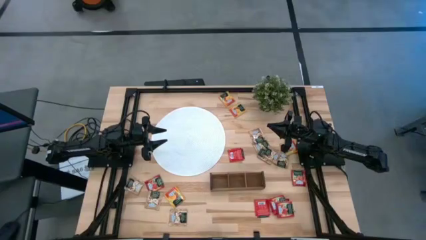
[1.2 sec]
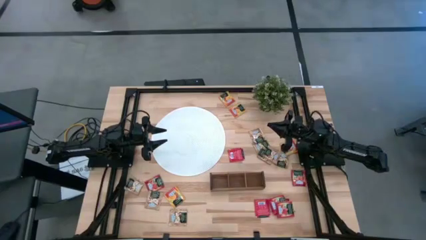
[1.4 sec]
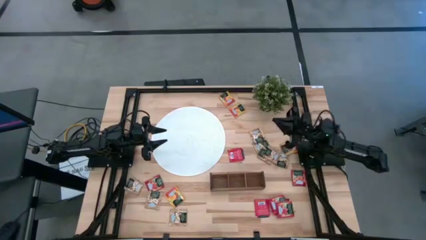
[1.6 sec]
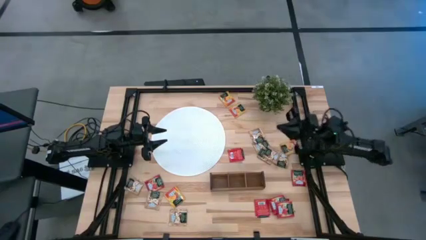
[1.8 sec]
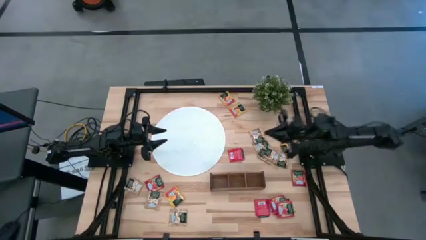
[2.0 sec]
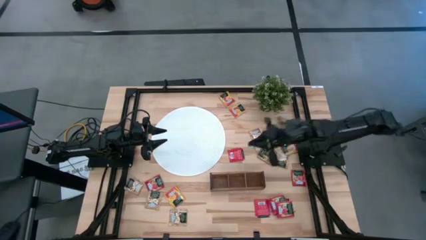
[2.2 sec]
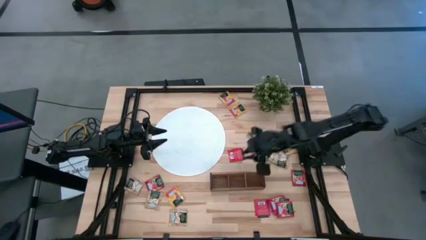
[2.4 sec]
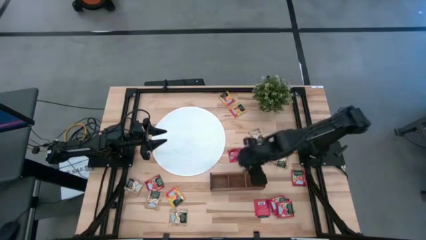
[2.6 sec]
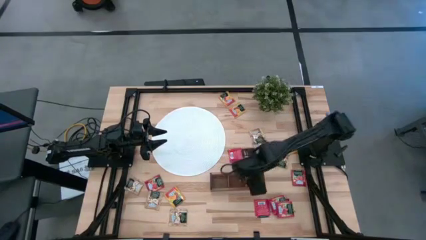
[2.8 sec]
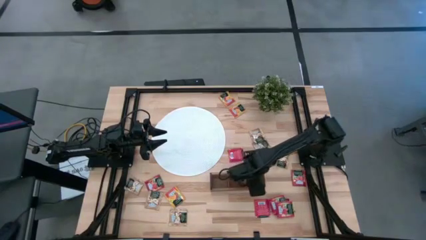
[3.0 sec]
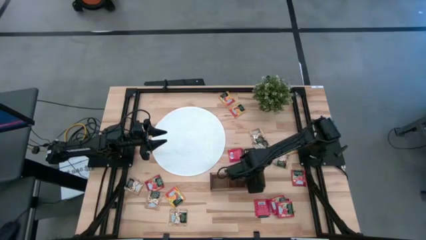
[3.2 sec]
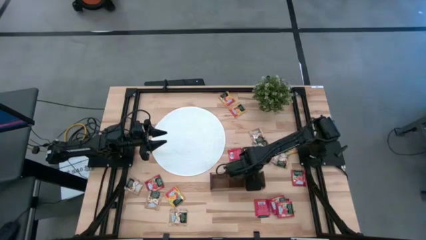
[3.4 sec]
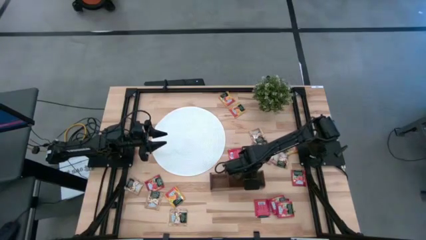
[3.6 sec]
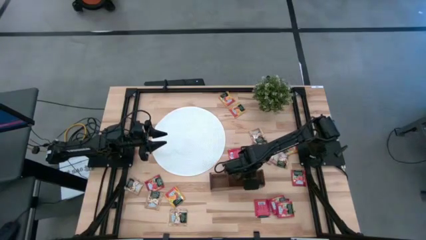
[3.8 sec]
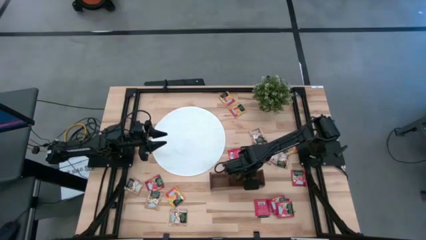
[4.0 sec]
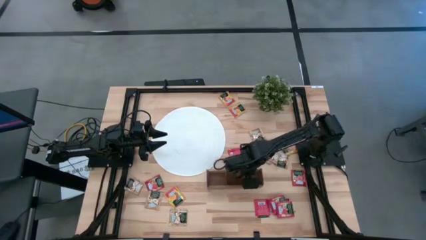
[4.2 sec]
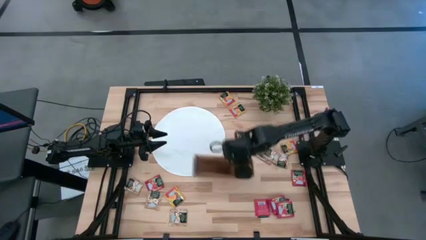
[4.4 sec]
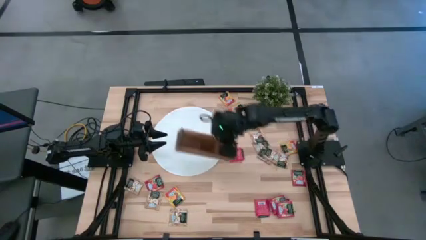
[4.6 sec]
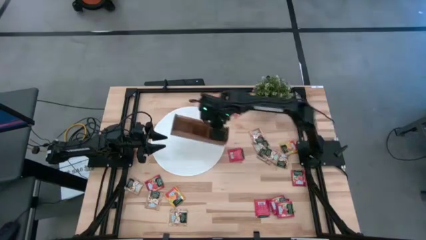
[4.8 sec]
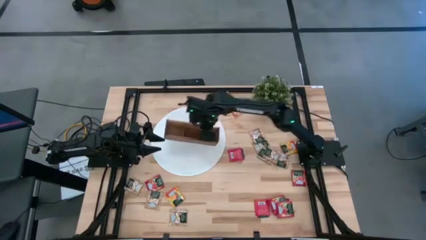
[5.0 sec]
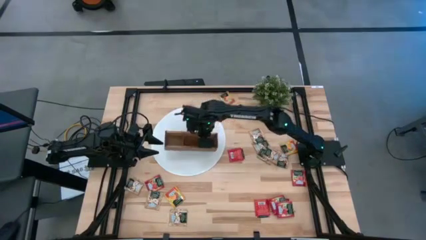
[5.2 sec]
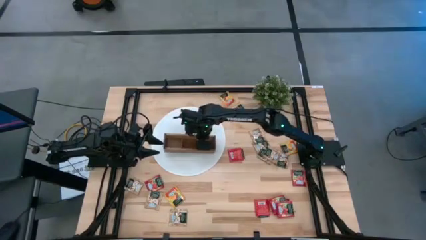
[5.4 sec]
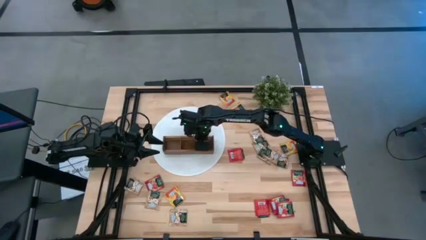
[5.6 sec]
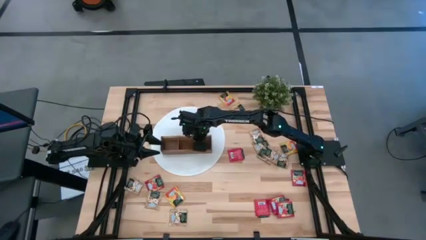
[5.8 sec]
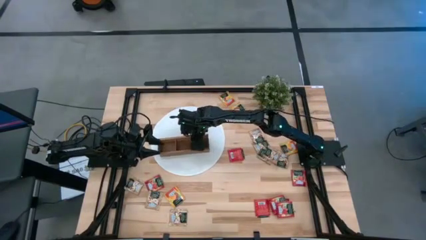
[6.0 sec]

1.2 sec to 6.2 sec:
Task: Pick & Place Tea
Prepare the wooden organizer

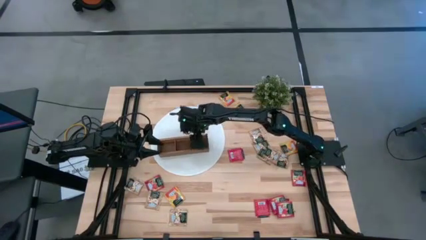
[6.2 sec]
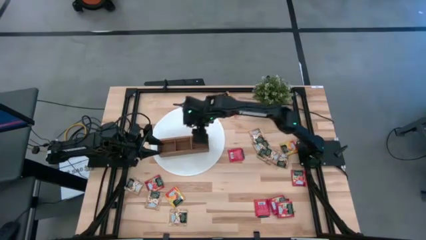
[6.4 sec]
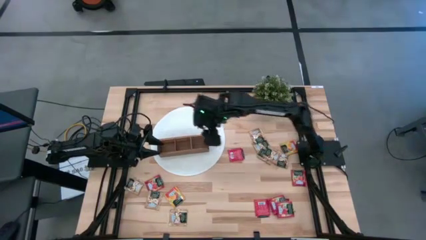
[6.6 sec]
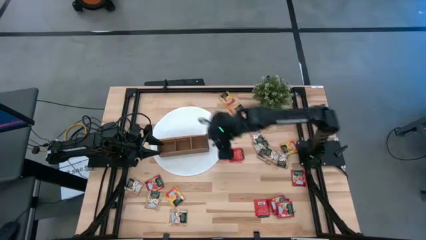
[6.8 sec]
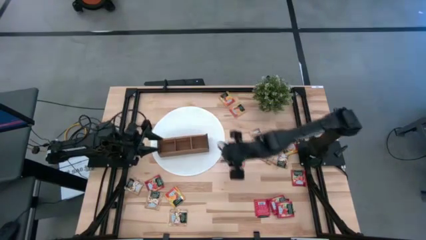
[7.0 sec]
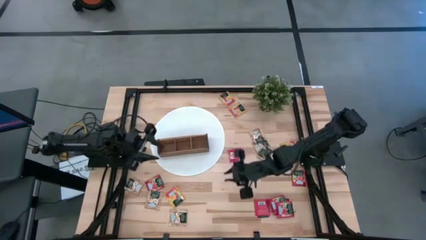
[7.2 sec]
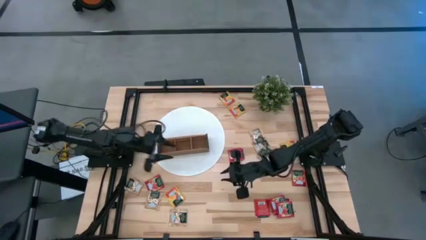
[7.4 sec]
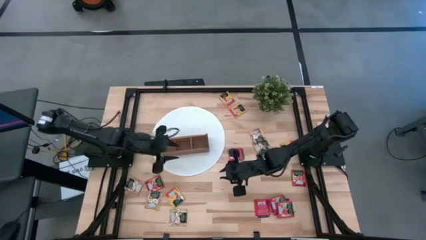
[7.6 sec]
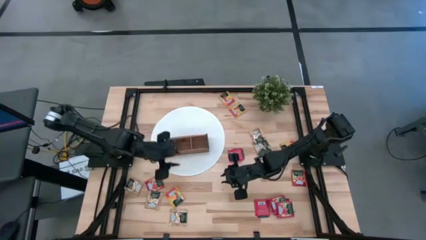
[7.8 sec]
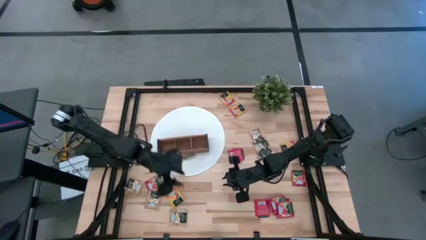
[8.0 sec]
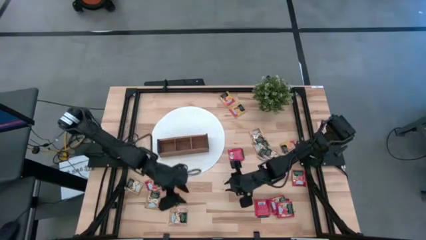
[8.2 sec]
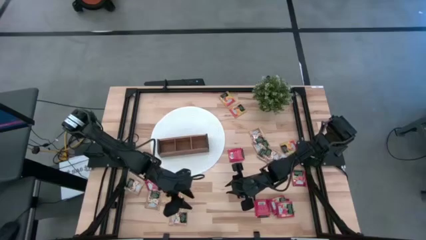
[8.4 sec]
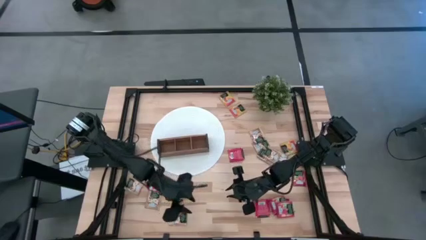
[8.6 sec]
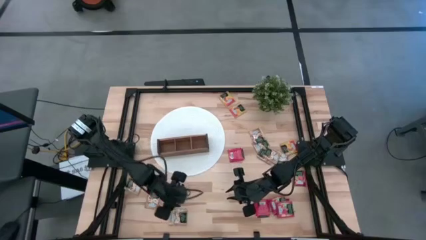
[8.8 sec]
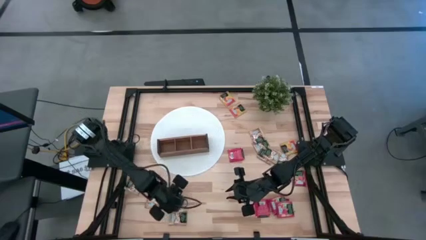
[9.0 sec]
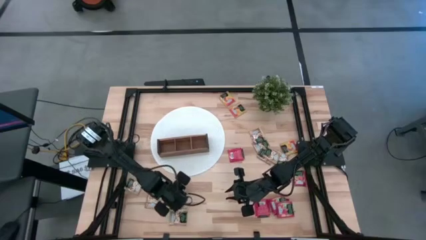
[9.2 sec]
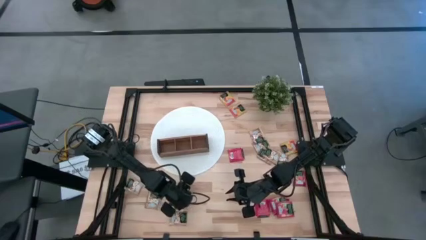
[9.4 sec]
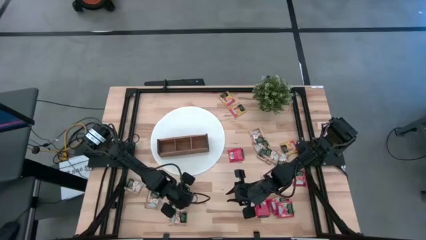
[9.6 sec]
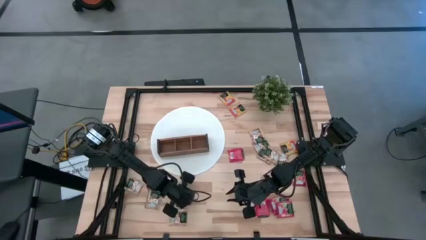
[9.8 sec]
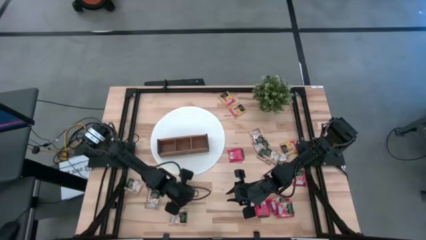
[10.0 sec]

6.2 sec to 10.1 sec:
Put the yellow tea bag into the right section of the wooden organizer

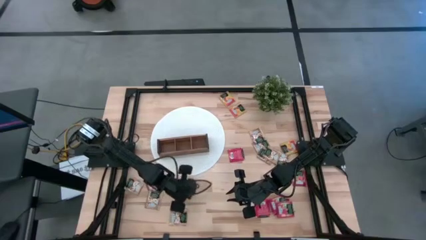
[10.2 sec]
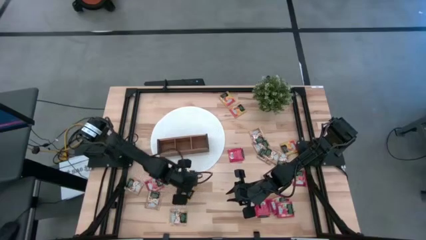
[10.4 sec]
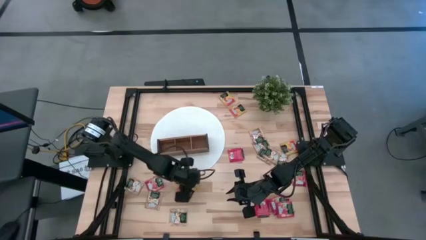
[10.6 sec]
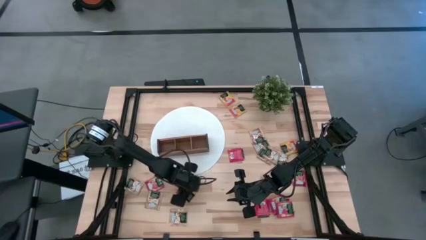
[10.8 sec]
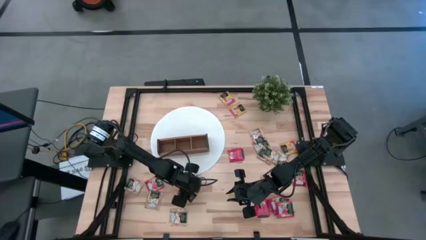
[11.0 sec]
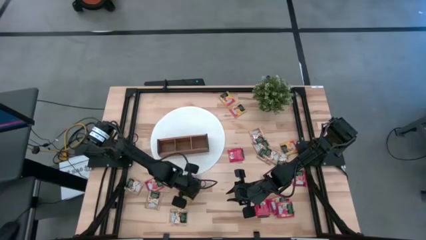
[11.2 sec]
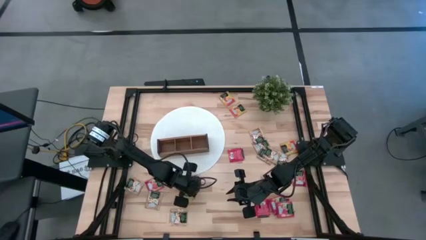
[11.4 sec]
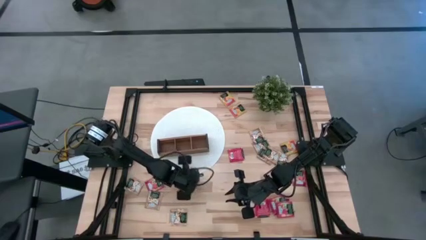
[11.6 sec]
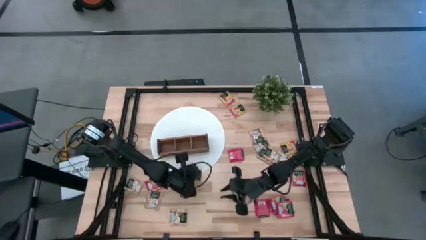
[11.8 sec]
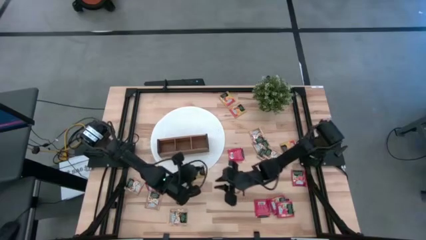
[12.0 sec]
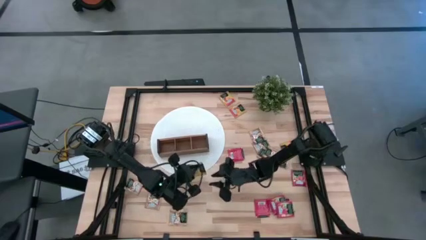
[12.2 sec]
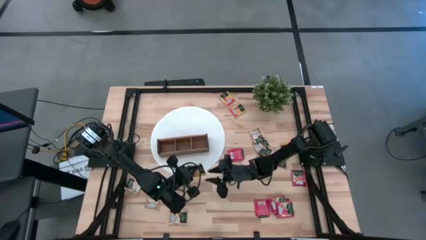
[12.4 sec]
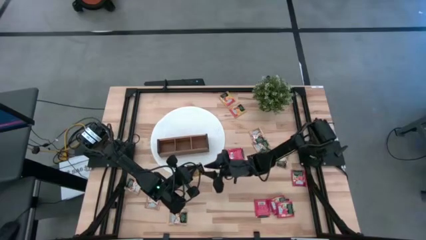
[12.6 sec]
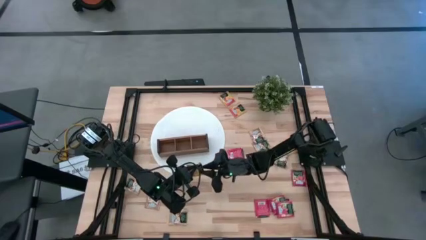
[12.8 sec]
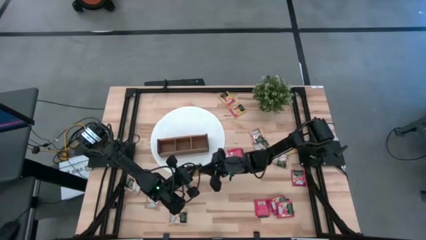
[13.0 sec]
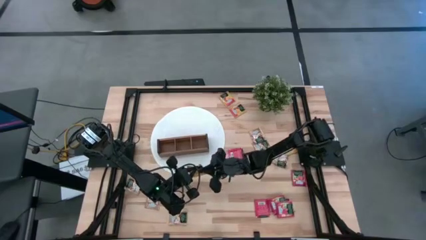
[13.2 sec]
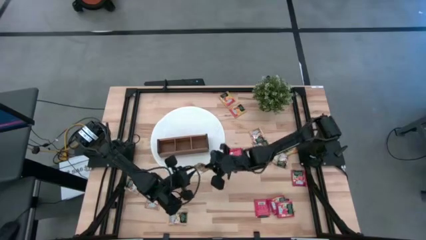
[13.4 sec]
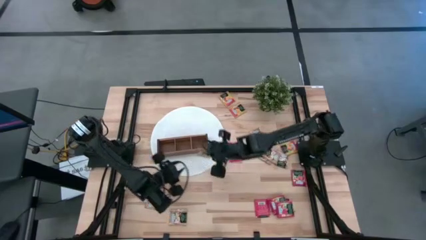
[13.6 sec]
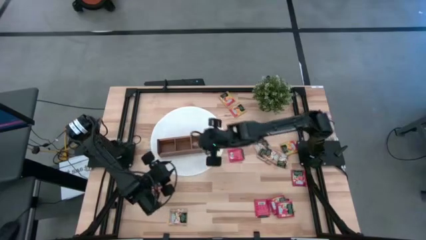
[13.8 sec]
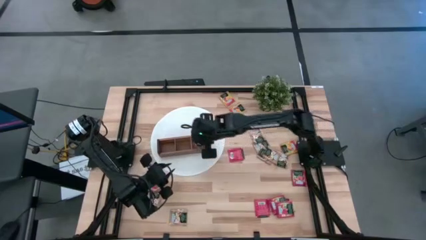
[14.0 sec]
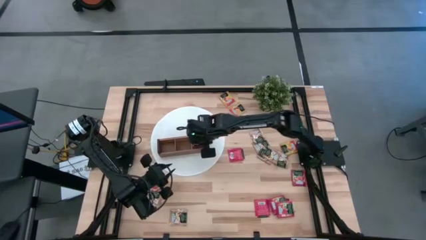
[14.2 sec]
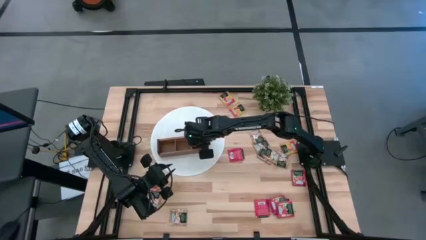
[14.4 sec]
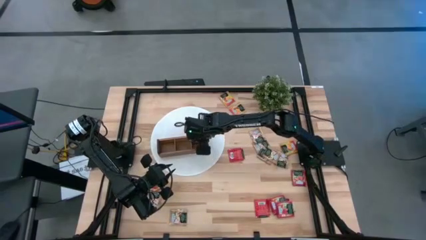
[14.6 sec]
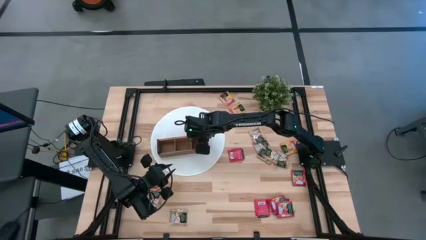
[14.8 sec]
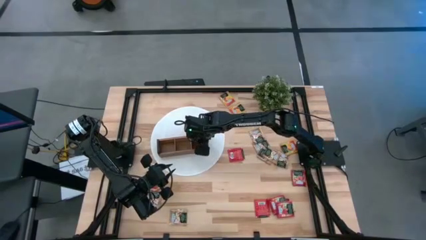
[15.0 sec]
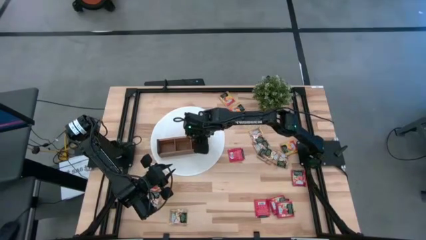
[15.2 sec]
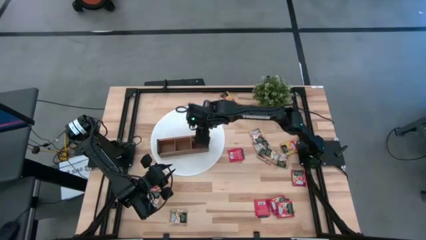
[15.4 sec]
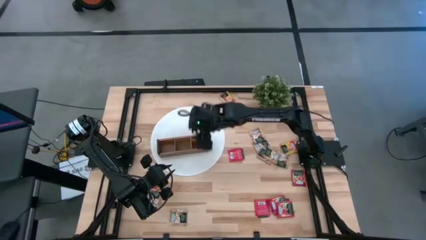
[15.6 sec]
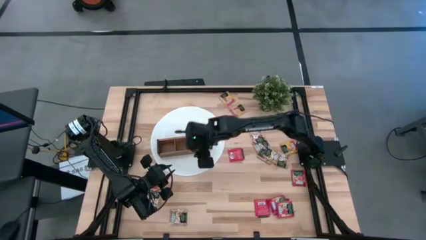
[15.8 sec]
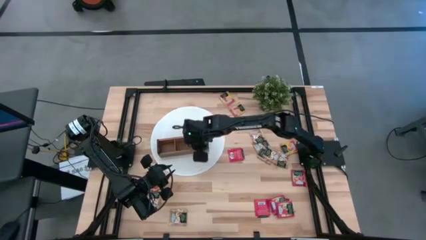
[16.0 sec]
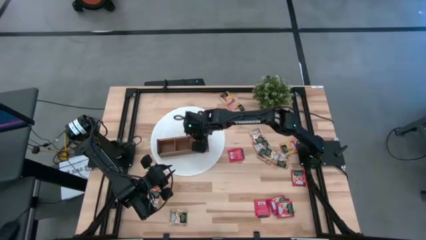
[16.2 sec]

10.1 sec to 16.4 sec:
Put the yellow tea bag into the right section of the wooden organizer

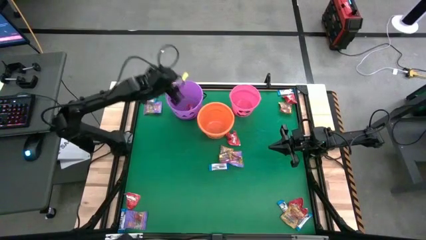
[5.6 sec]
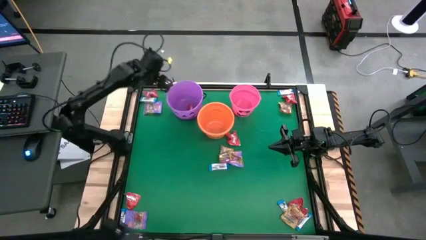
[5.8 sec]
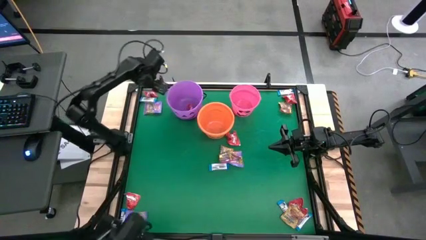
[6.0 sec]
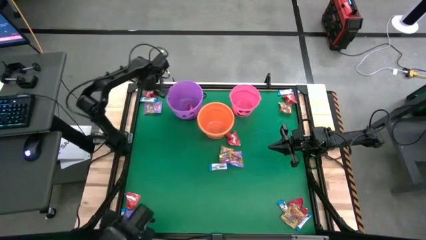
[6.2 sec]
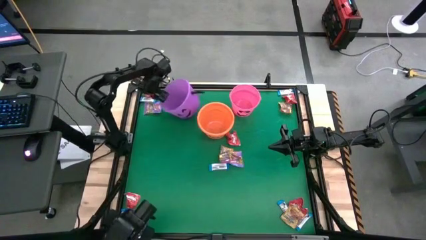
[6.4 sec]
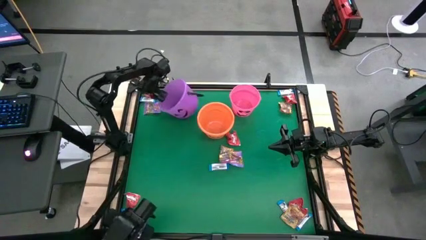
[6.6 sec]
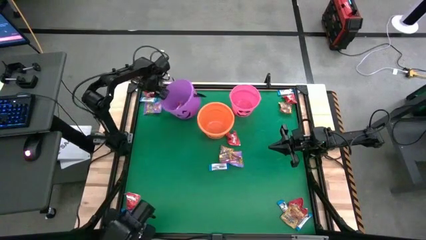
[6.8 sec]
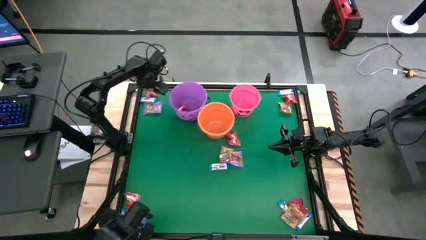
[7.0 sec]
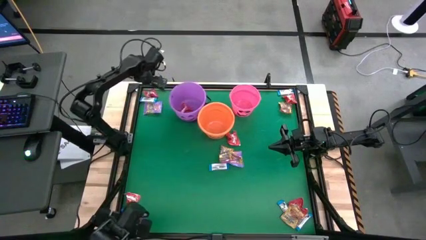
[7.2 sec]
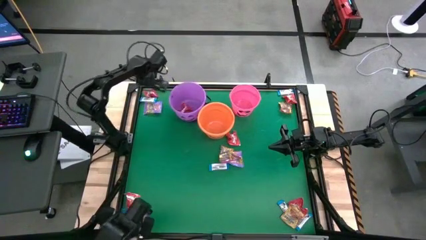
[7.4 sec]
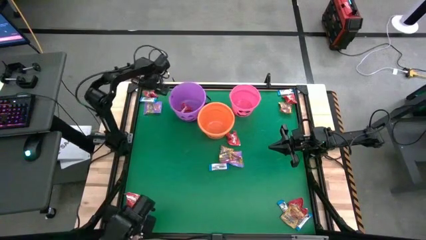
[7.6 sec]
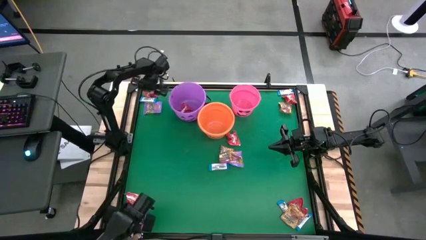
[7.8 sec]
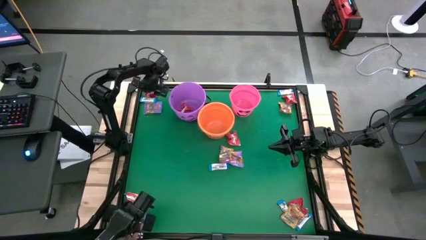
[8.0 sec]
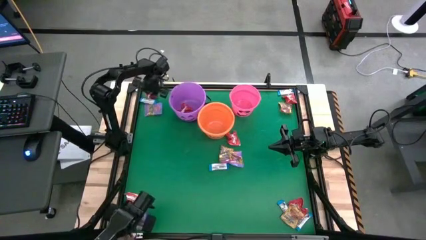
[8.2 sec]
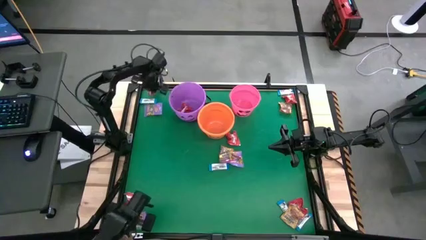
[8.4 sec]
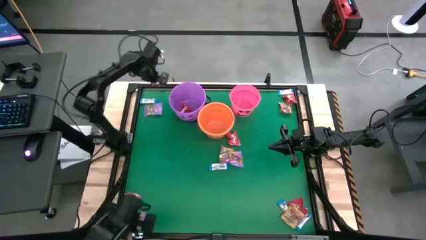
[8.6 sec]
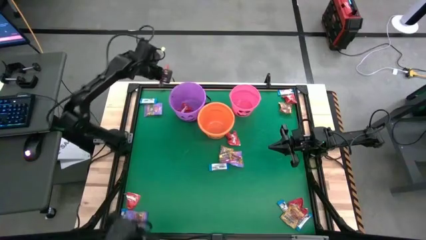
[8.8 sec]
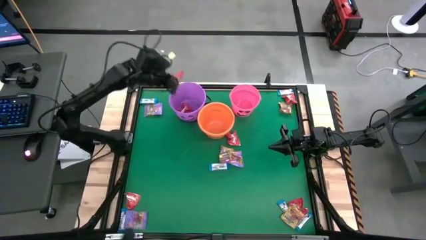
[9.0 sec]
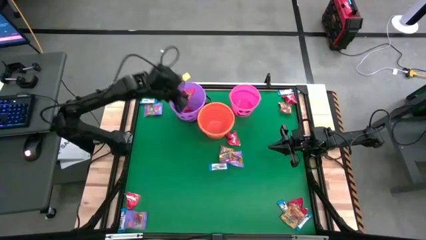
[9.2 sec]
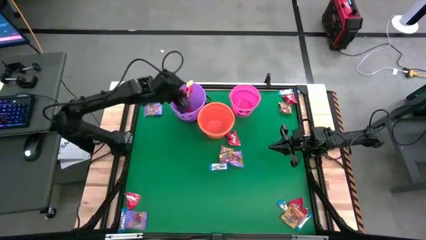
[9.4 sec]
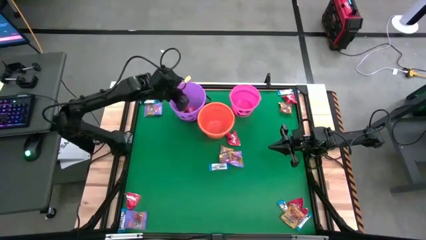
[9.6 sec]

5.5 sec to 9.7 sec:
Task: Sort candy by brand, put in halloween buckets
Put the red candy into the purple bucket
